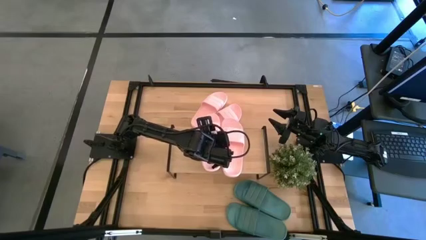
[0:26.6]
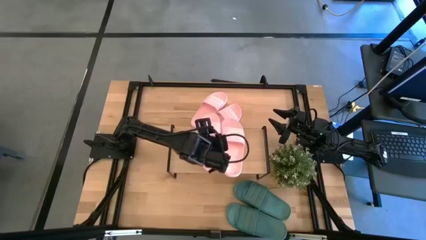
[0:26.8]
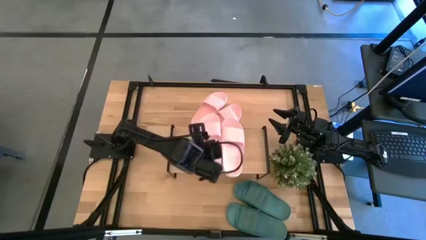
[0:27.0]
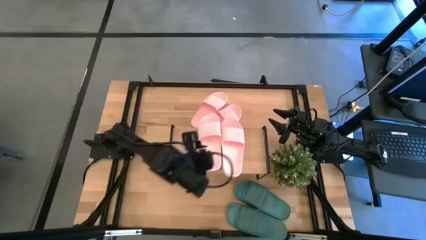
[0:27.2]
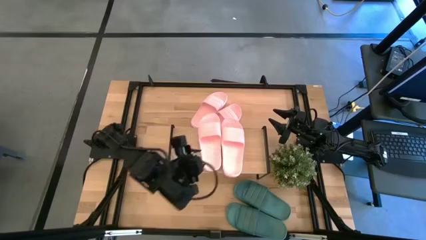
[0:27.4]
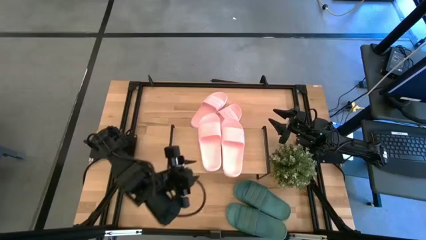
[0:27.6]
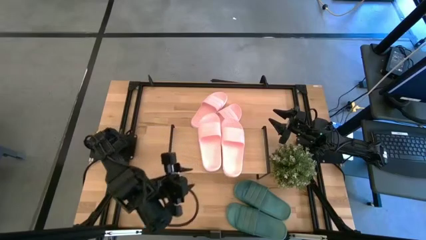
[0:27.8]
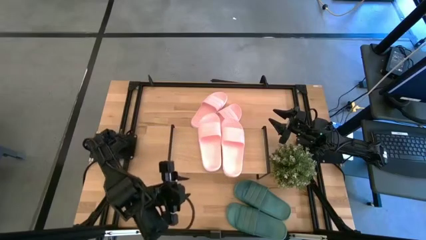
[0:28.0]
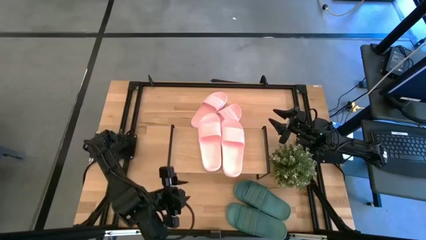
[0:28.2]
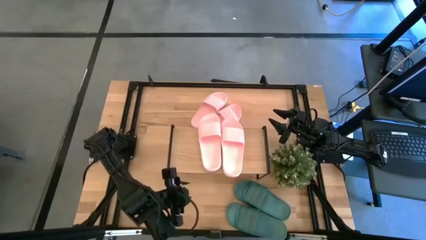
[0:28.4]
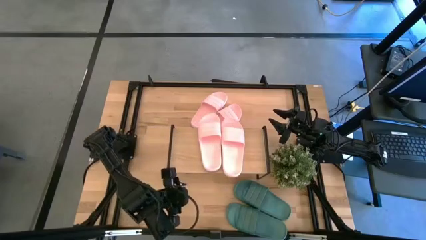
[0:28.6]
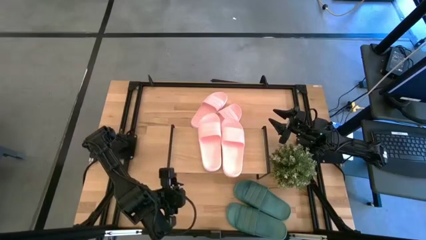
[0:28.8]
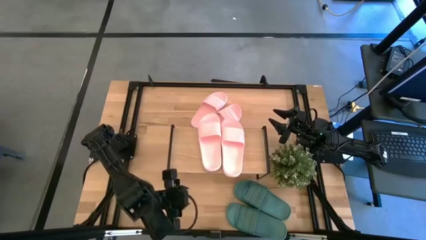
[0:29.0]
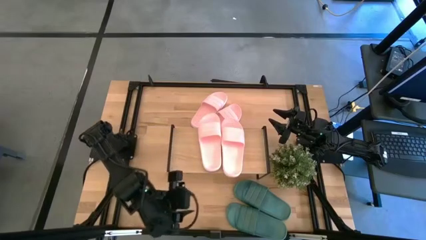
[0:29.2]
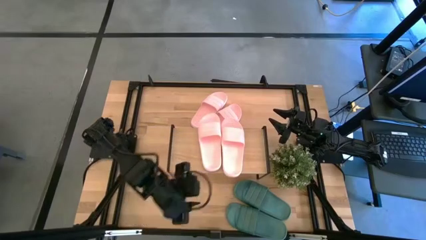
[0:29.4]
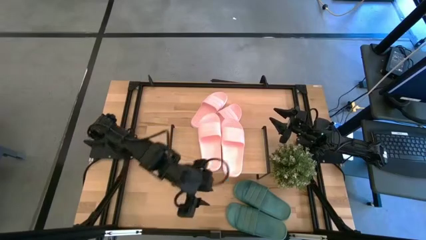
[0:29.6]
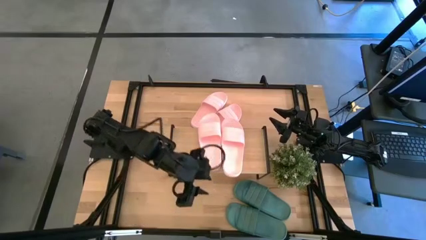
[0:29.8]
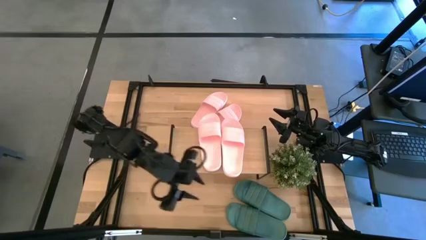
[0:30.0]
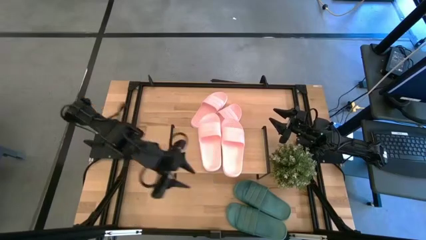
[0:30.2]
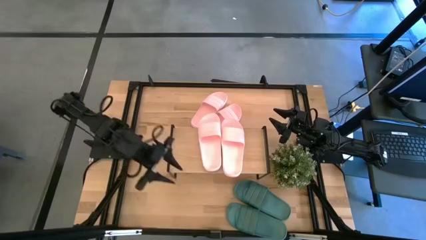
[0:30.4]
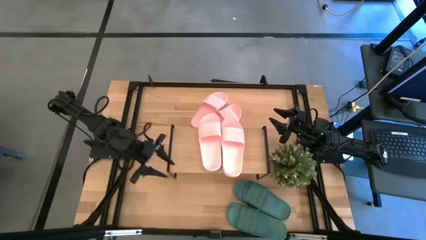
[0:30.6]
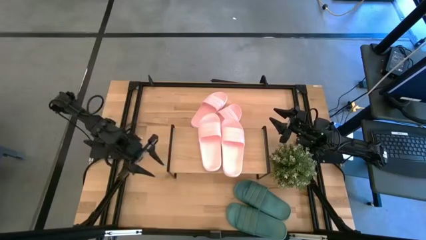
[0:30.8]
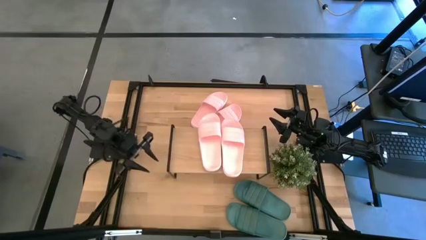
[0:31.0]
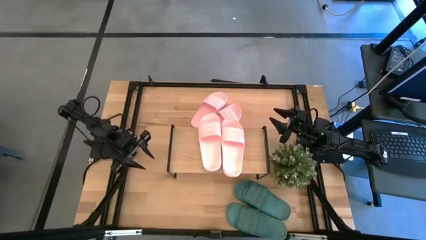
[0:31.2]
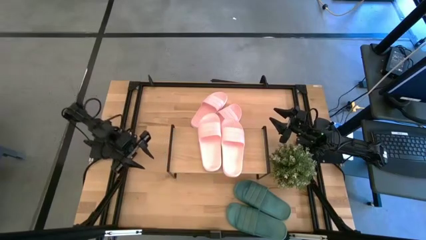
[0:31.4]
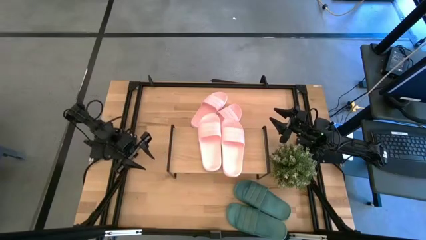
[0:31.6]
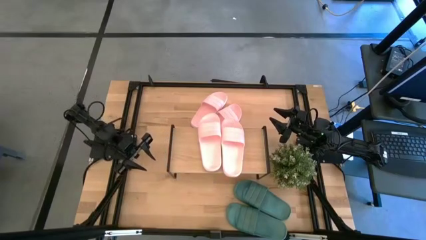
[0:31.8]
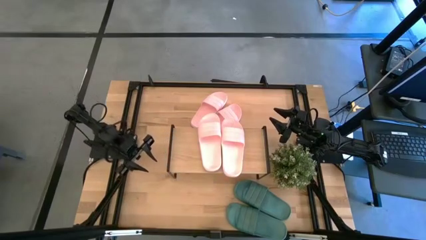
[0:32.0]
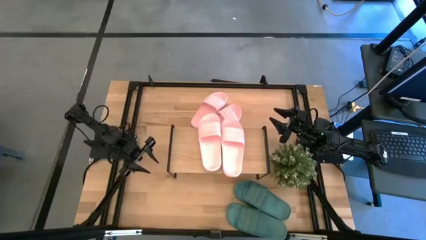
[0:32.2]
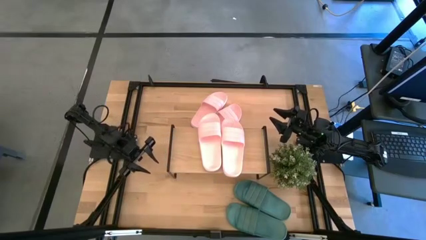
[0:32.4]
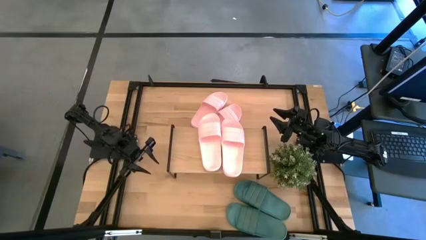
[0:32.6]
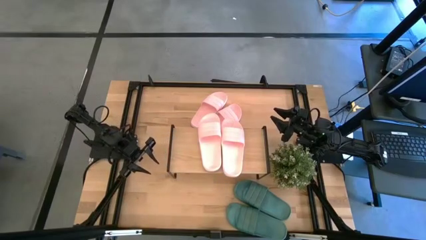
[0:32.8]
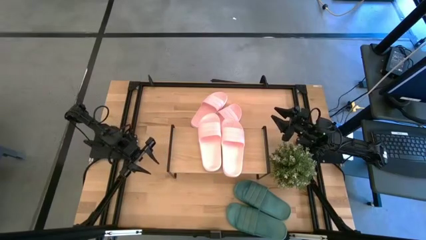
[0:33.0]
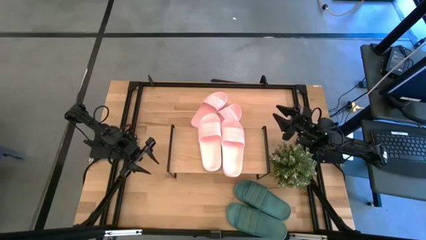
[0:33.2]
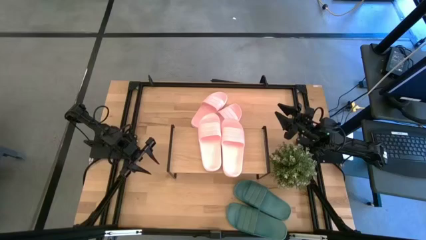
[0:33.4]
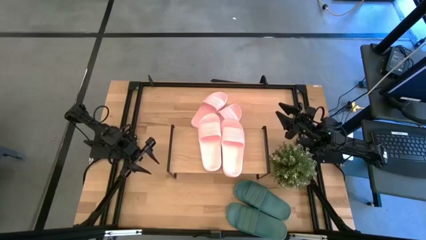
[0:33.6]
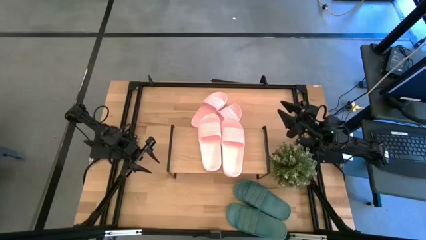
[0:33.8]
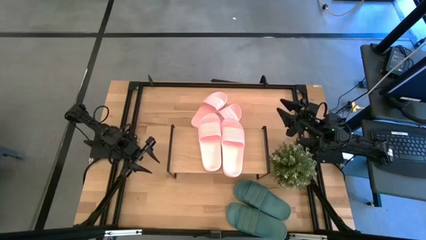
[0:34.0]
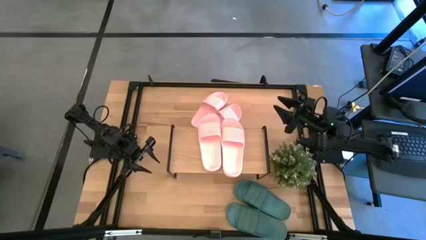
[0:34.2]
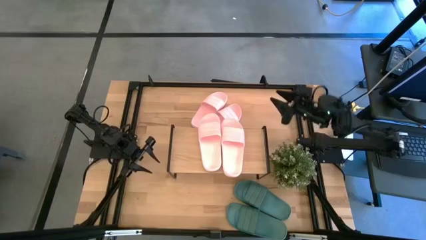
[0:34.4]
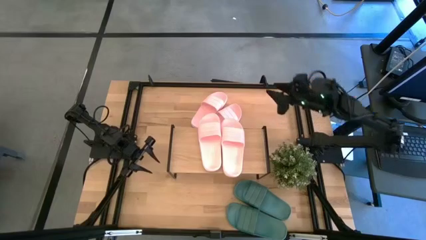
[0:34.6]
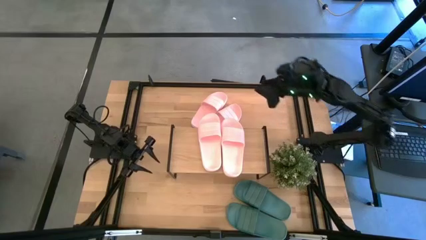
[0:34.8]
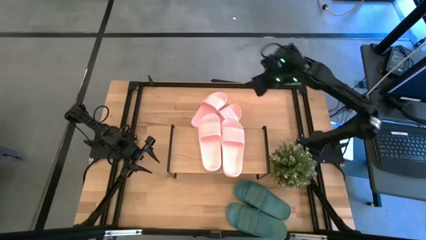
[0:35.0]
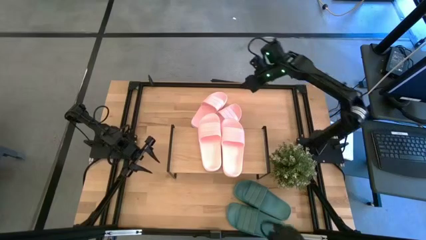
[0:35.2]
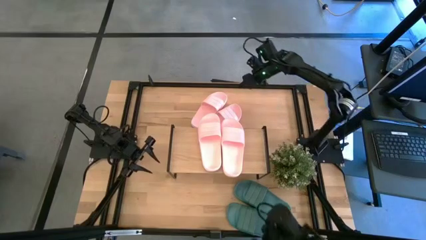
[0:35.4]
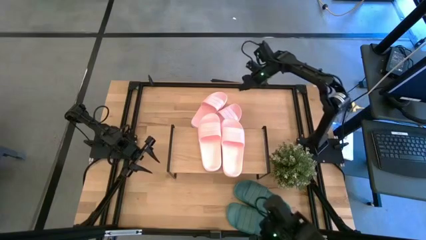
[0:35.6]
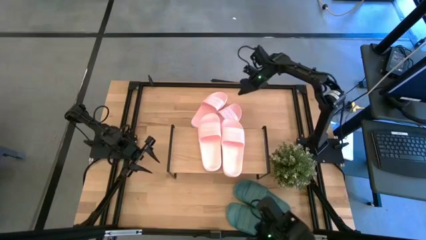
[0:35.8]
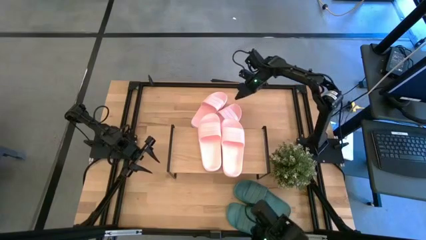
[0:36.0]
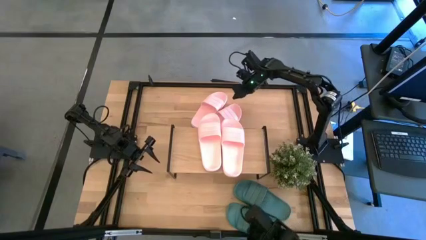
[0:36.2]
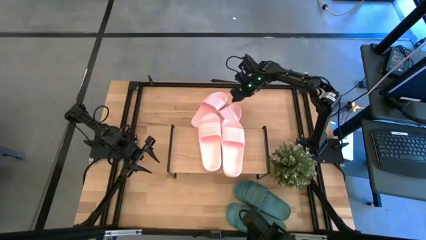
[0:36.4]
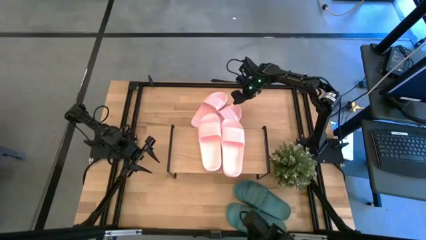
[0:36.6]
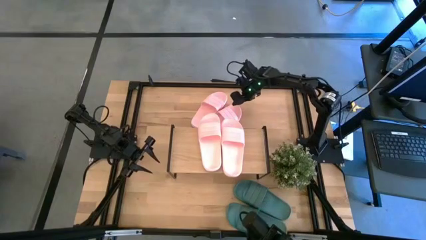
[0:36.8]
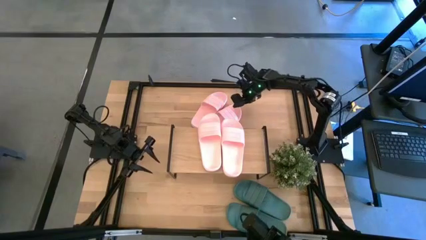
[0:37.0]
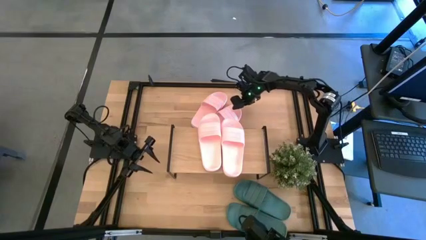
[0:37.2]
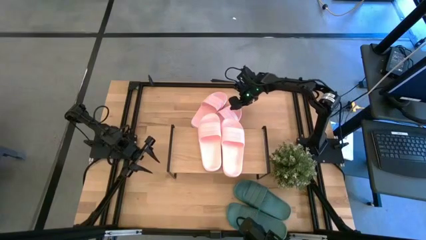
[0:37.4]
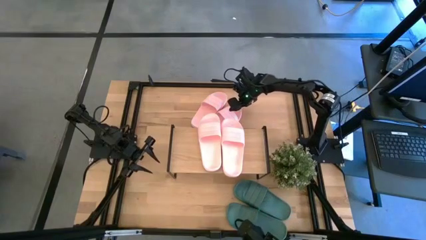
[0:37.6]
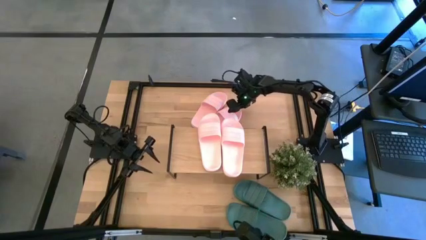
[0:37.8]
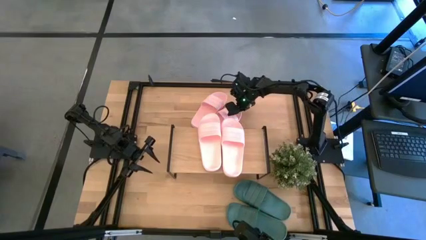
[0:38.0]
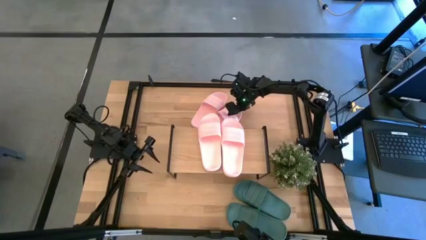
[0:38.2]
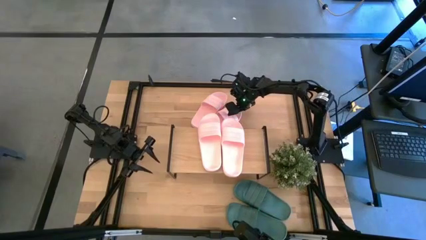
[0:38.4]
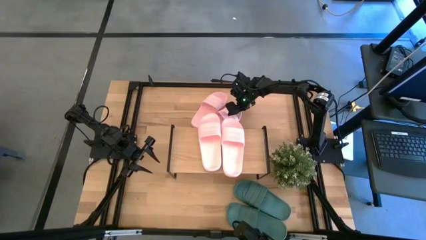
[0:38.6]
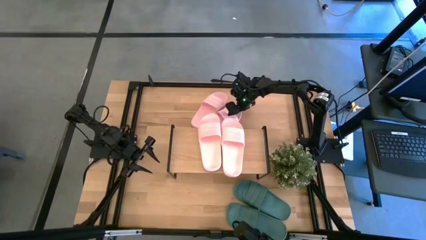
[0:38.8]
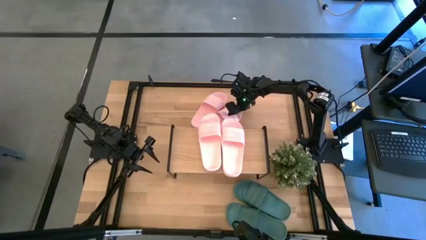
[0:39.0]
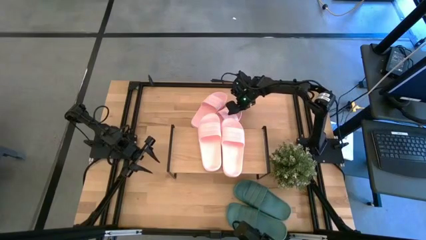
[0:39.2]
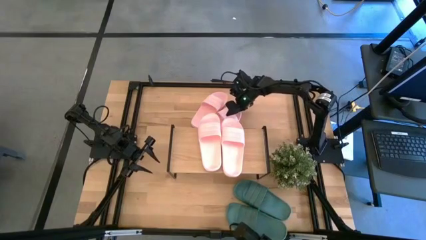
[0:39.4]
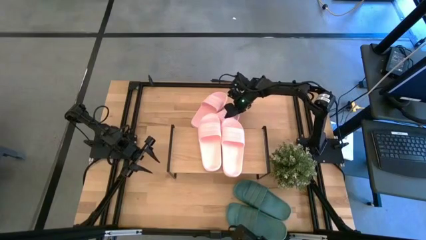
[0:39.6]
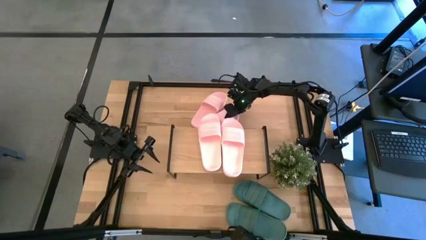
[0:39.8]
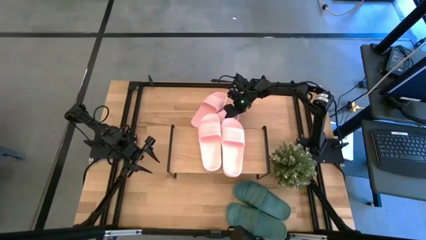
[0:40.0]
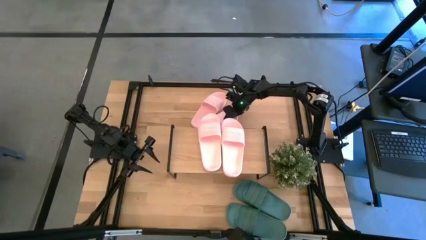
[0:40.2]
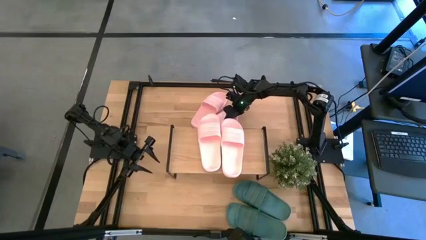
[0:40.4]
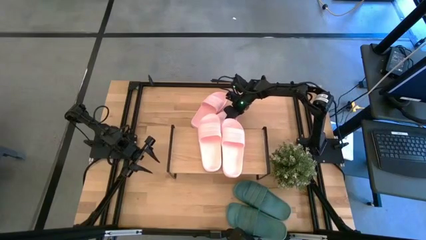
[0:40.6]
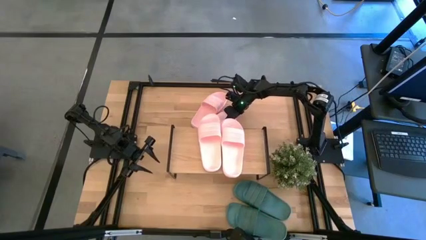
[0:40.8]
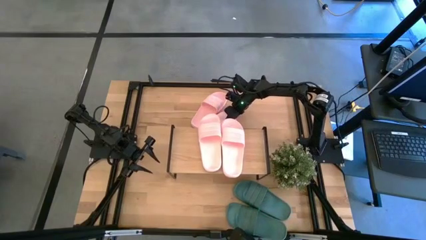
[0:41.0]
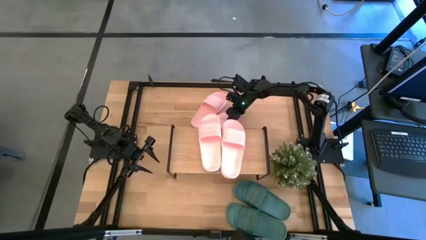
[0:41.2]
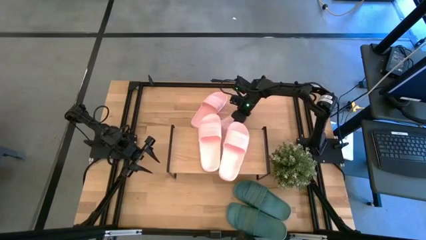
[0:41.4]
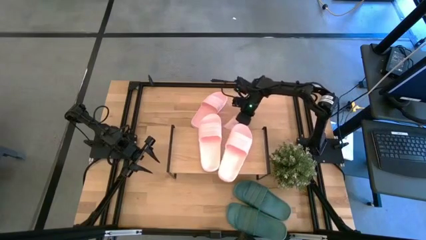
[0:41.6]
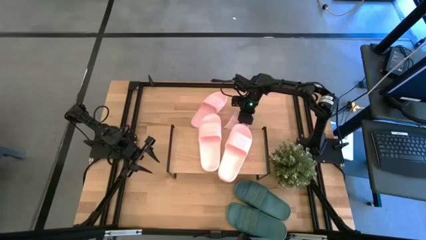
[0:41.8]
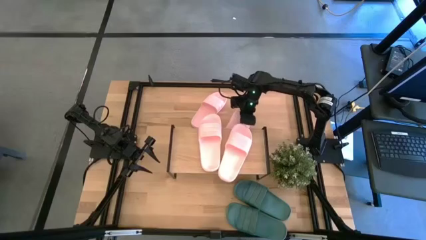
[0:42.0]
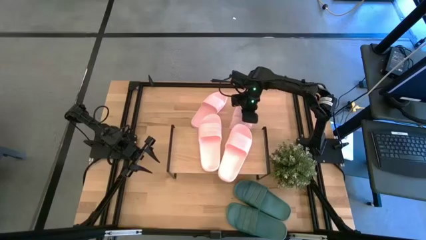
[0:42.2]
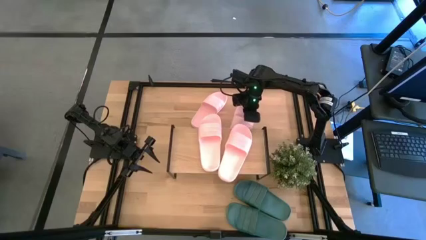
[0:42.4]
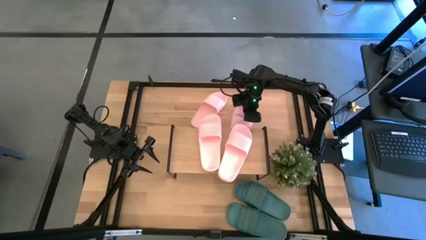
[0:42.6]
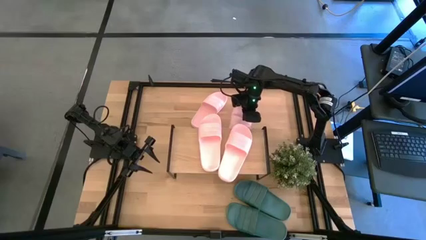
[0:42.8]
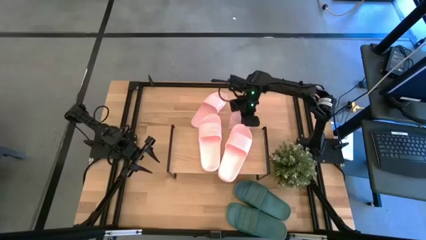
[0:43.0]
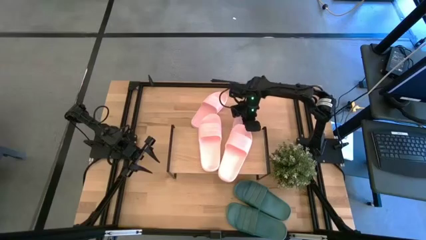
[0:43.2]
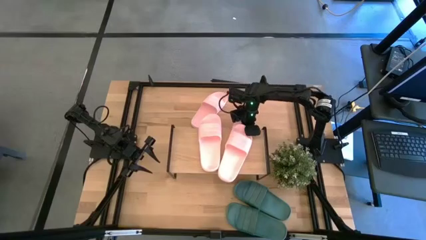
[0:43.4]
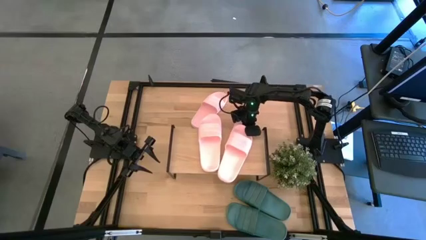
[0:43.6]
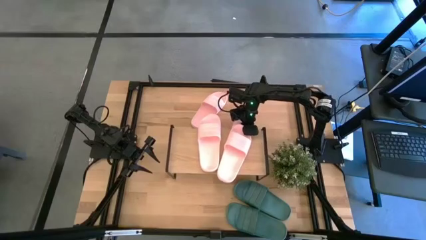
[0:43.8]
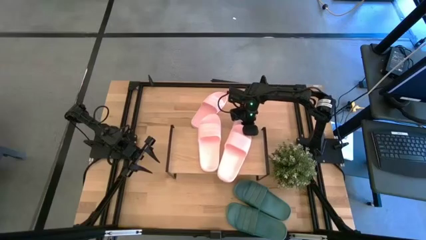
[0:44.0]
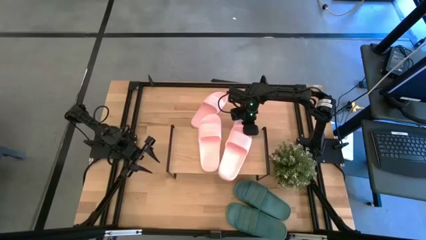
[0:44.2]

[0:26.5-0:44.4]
Task: Pick and place slides into the shelf
Put the pink slipper under the shelf
